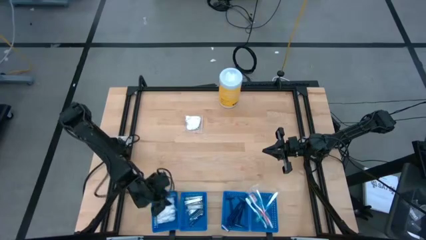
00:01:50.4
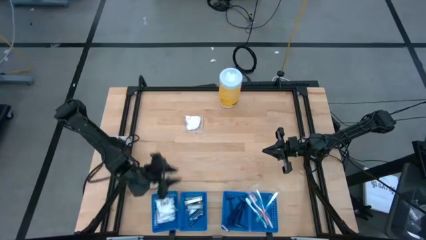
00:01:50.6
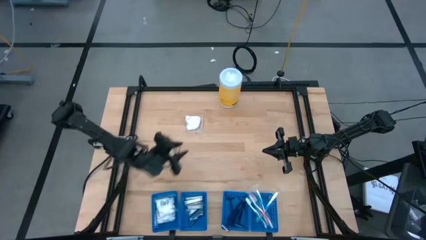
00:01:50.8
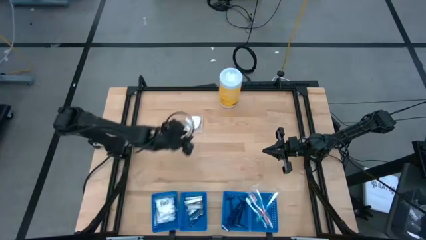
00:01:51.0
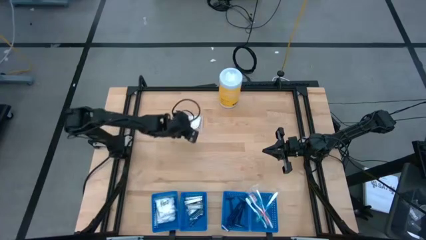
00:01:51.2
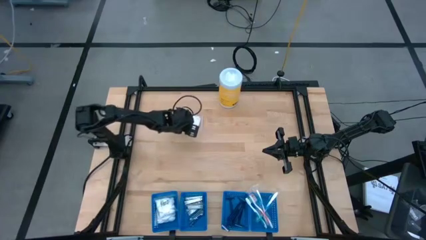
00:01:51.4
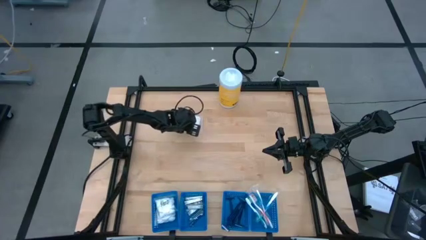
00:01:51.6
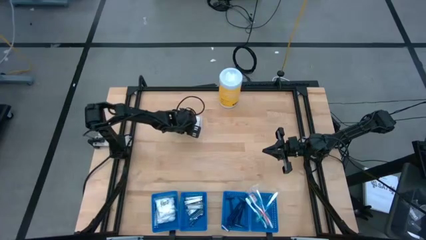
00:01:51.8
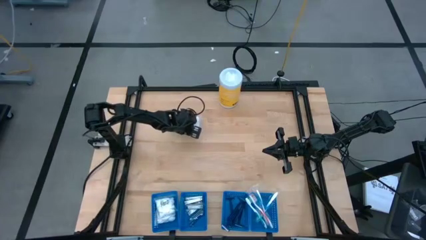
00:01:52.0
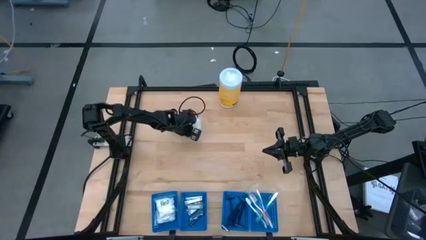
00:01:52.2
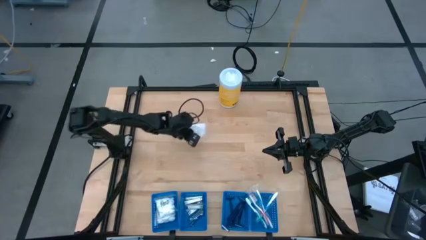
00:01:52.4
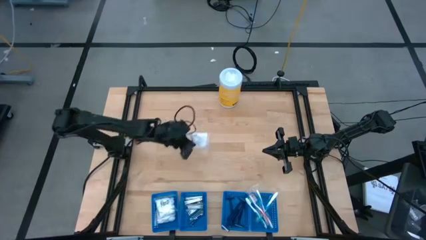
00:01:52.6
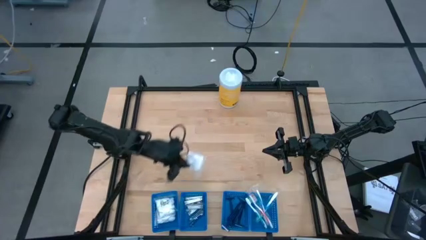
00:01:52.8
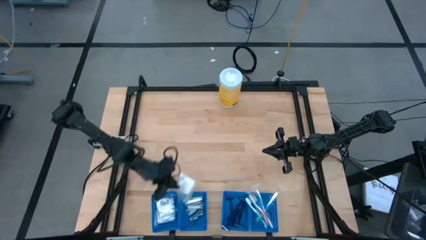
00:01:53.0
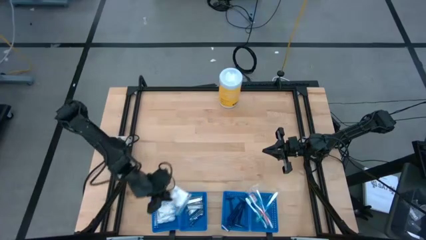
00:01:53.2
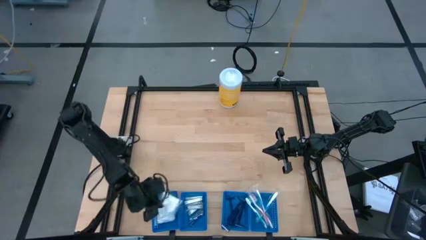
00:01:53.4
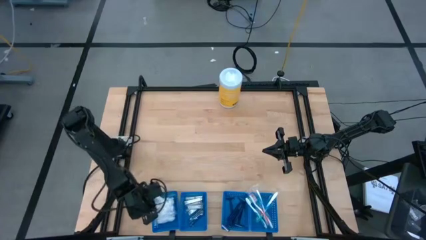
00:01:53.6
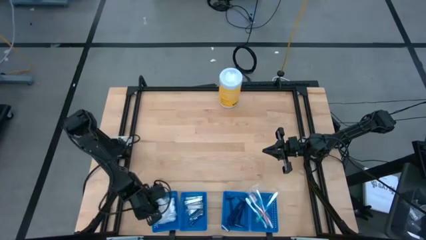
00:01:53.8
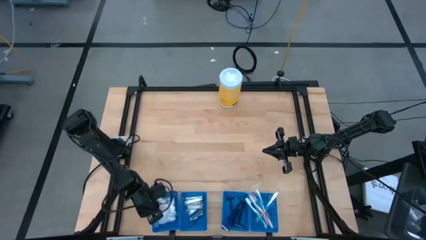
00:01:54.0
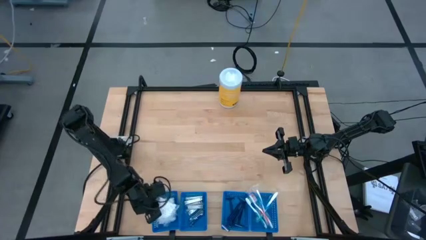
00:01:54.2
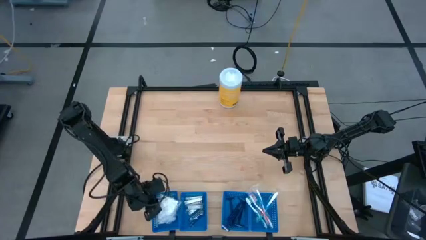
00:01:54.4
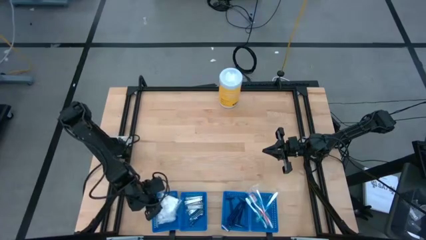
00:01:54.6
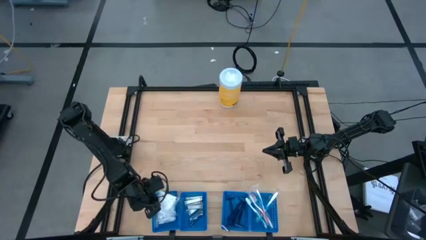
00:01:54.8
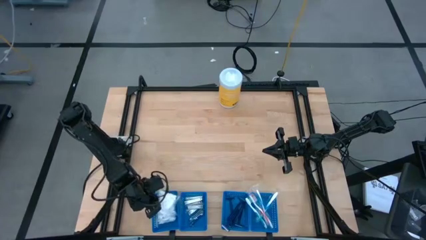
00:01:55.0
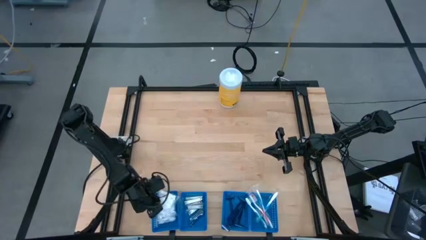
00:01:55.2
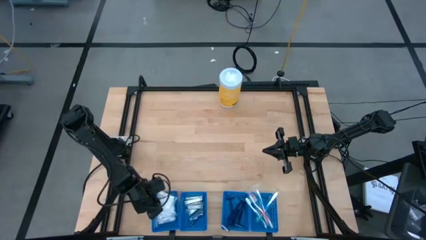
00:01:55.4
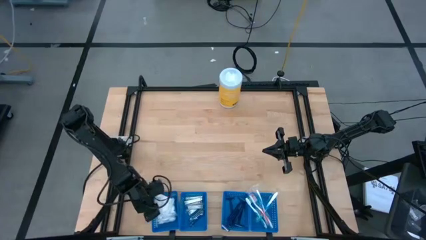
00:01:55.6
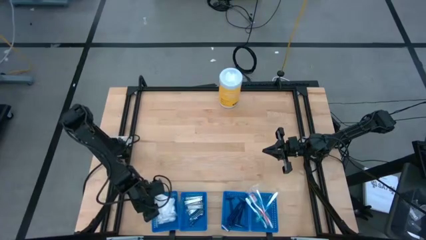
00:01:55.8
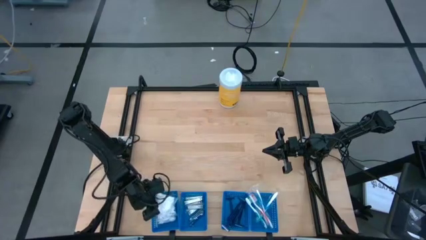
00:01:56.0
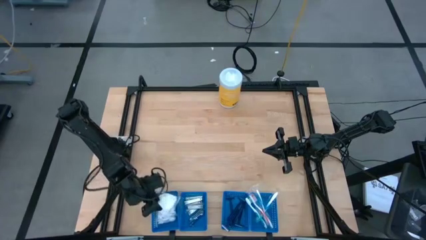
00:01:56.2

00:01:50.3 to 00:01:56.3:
Task: Pick & Place Travel size toiletries
Put the white cotton pack into the blue basket

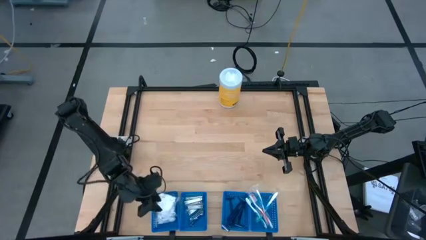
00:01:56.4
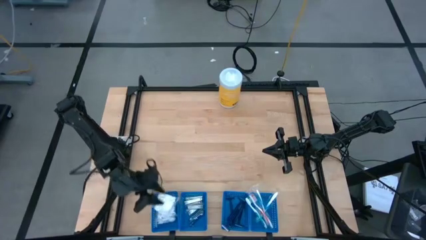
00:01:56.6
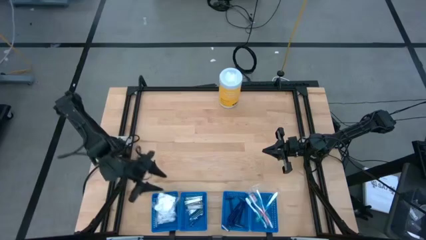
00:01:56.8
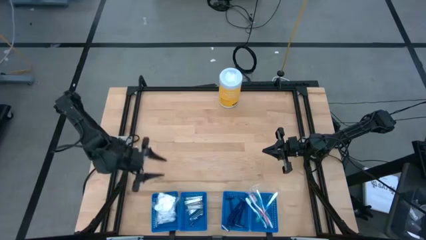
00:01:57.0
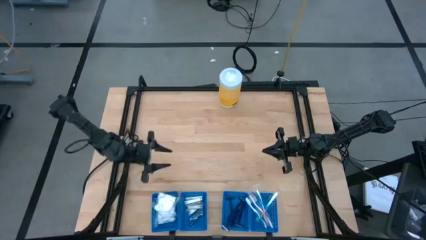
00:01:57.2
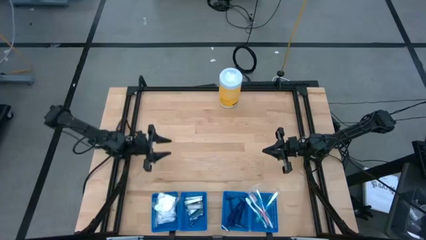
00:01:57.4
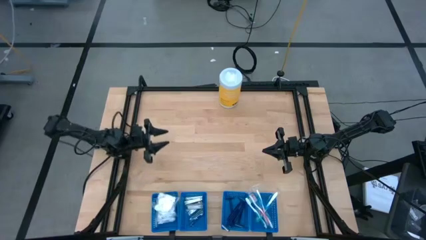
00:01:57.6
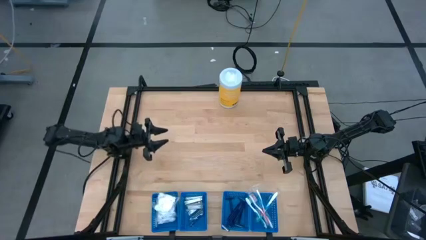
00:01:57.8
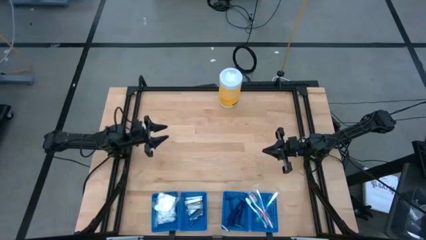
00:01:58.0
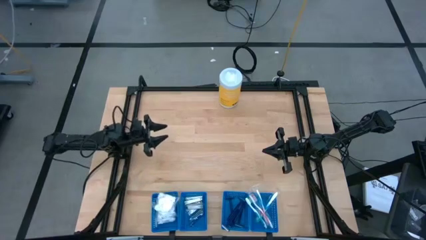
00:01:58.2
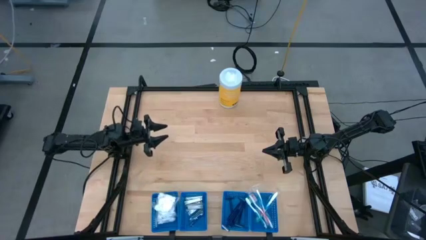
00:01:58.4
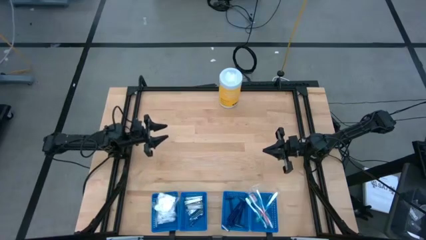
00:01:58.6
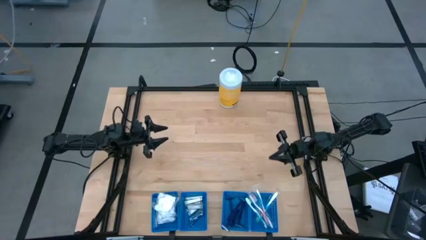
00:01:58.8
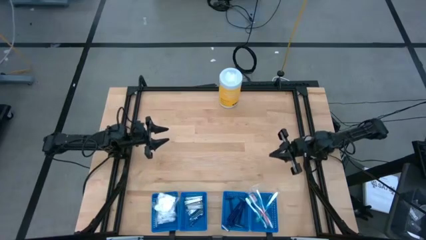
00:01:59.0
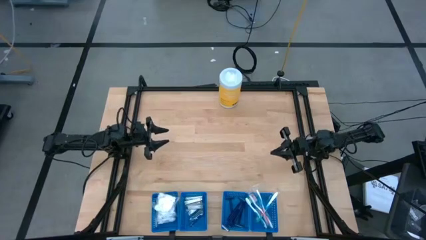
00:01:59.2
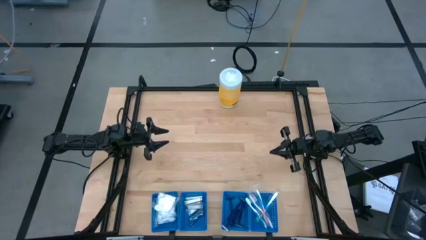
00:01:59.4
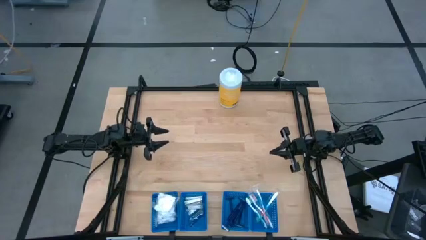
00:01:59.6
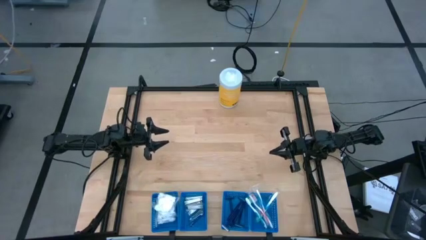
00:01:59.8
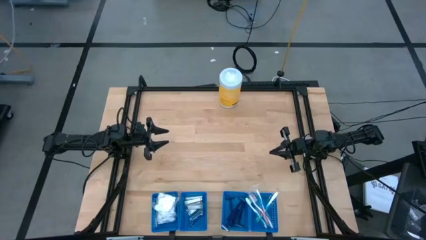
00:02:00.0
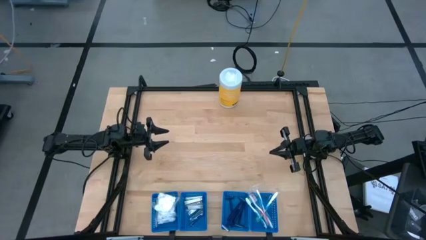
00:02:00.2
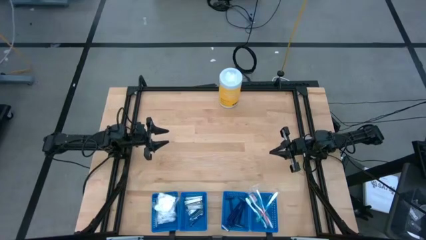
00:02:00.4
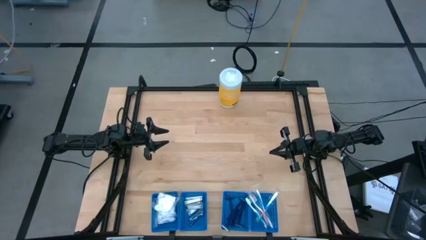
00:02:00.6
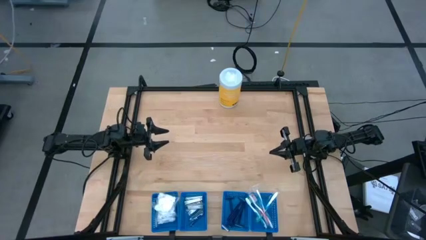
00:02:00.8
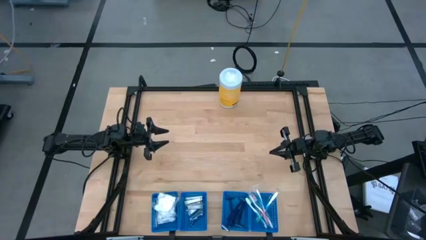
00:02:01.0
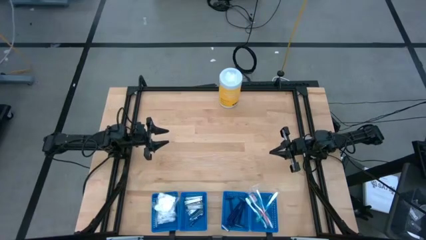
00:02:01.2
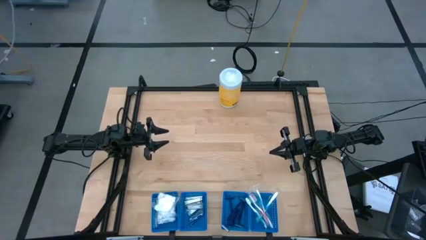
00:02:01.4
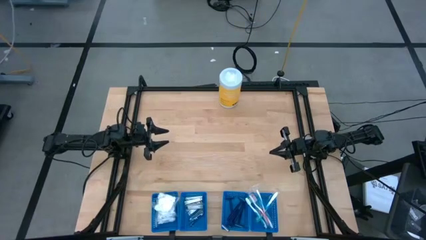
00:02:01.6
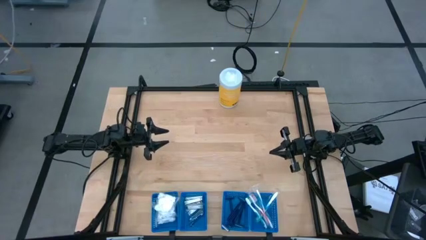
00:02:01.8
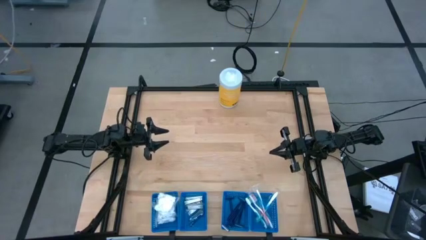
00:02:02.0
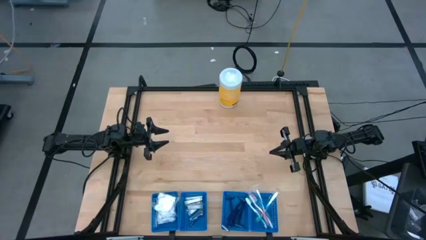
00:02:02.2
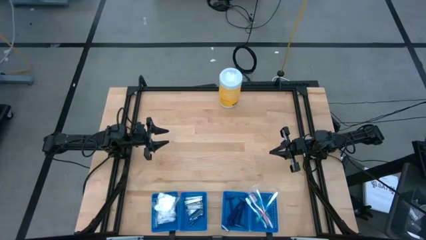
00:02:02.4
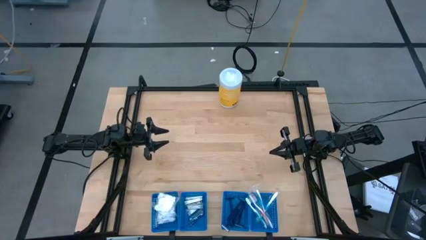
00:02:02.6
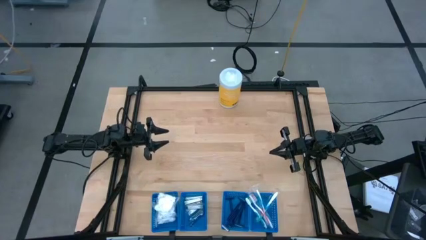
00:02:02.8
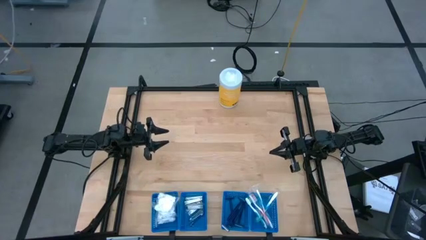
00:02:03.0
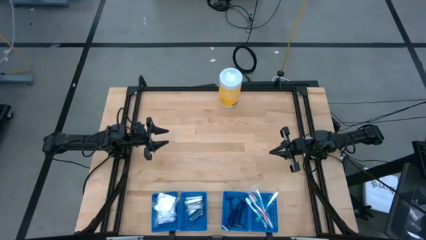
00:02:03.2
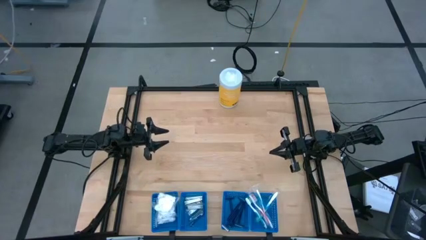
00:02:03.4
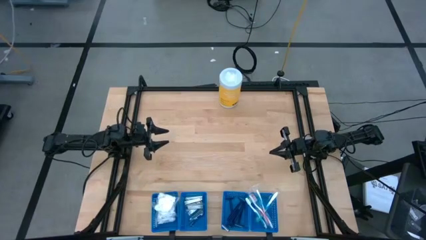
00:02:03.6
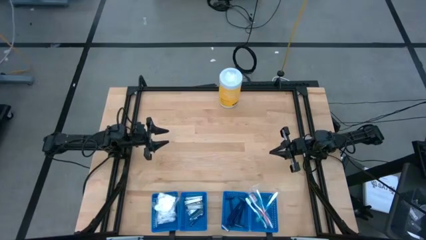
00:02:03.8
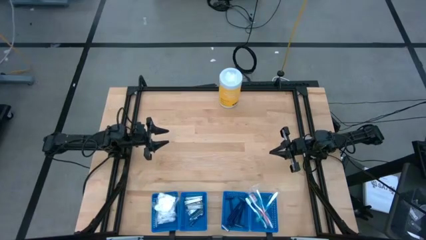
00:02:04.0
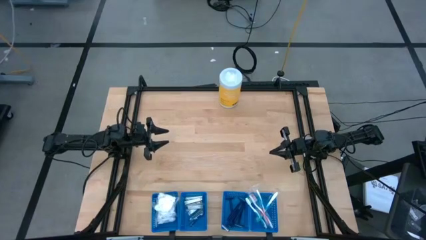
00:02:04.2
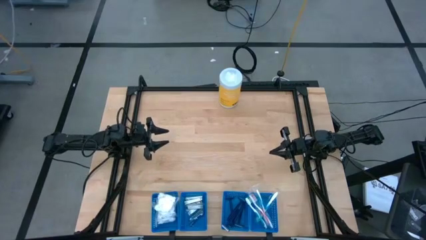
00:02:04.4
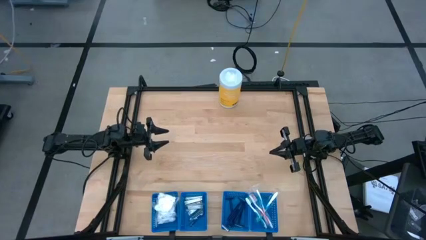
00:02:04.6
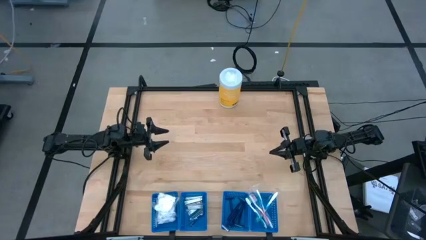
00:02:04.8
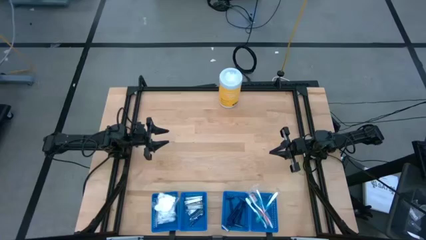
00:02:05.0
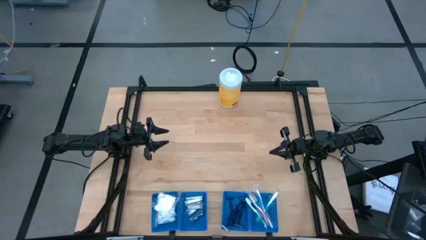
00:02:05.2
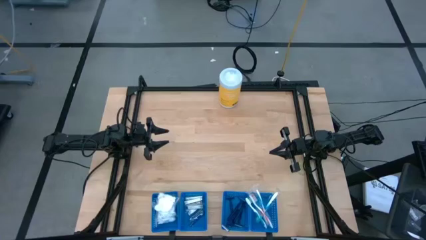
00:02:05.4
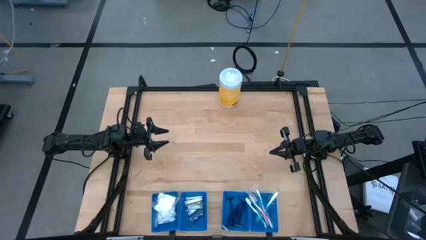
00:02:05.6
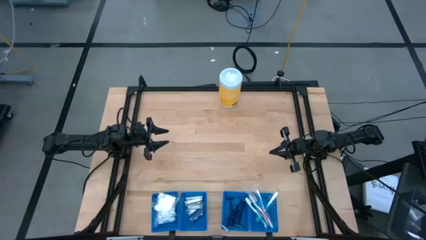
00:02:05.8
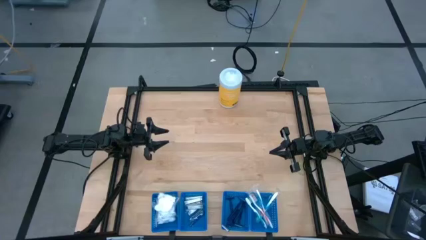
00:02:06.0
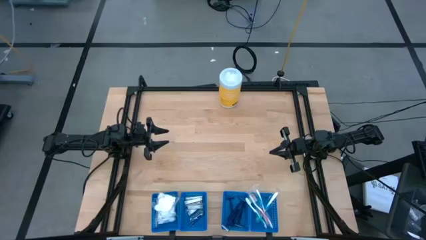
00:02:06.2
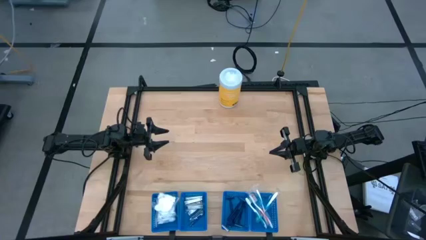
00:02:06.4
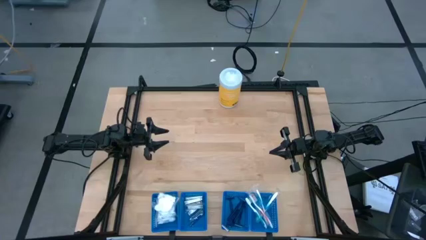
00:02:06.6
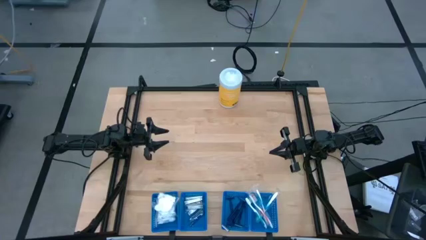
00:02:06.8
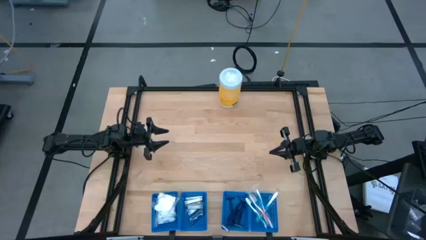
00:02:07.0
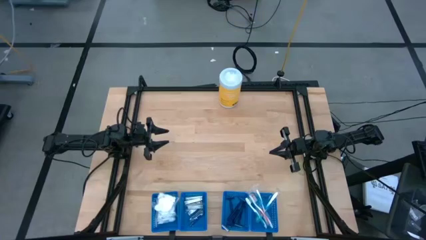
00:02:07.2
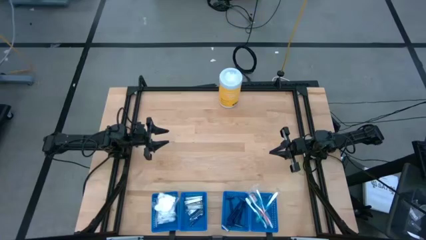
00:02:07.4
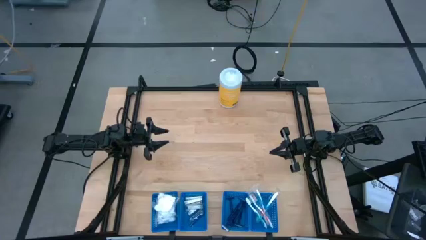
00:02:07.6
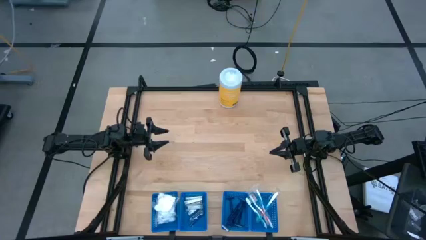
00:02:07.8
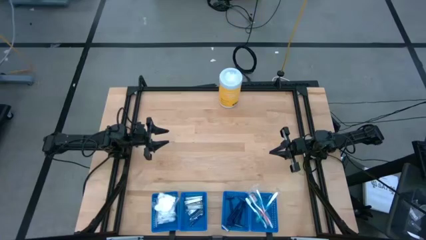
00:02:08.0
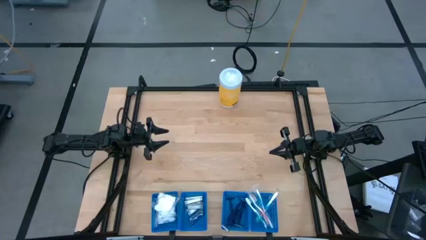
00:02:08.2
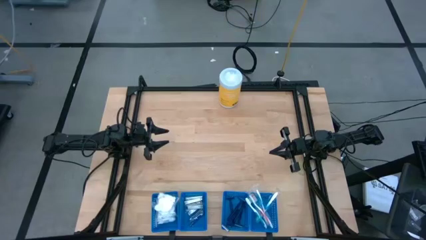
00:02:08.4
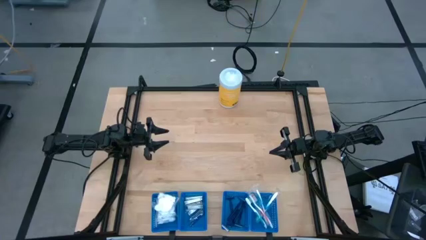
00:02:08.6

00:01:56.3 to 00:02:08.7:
Return to Home Position
